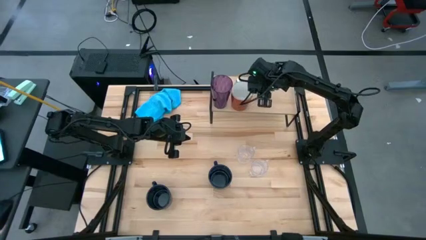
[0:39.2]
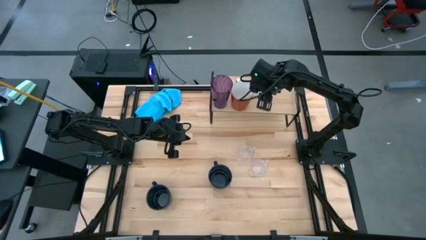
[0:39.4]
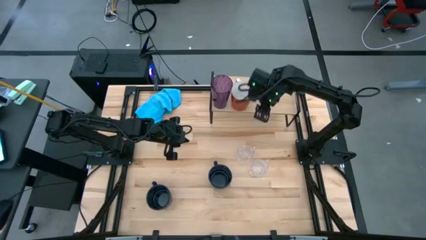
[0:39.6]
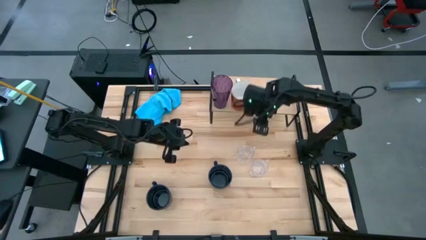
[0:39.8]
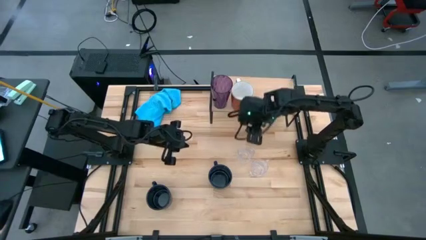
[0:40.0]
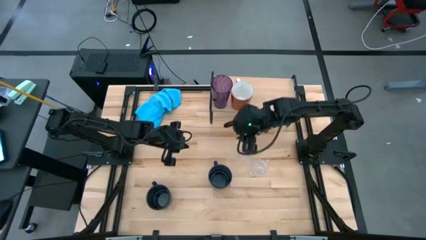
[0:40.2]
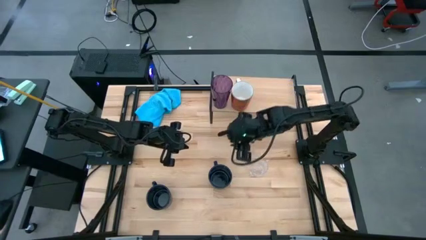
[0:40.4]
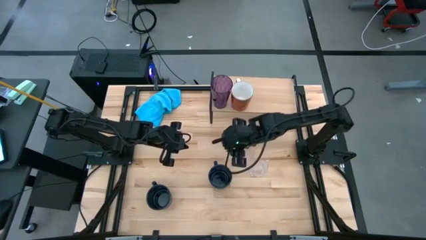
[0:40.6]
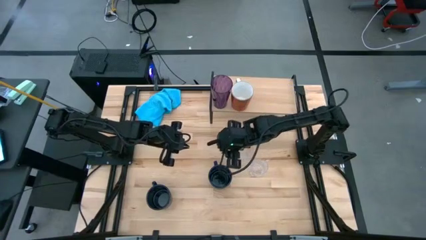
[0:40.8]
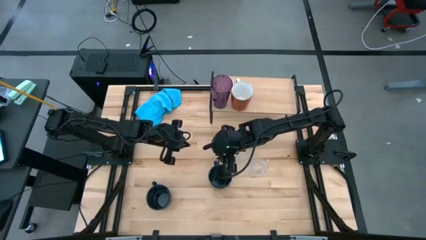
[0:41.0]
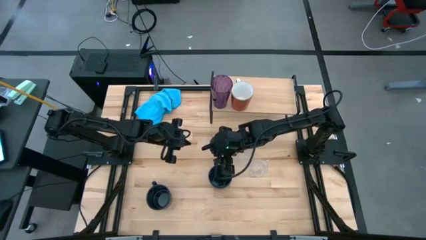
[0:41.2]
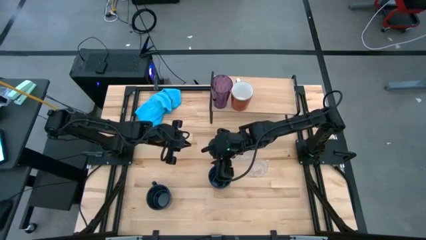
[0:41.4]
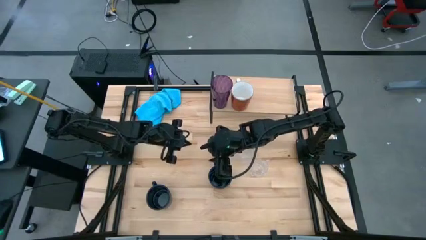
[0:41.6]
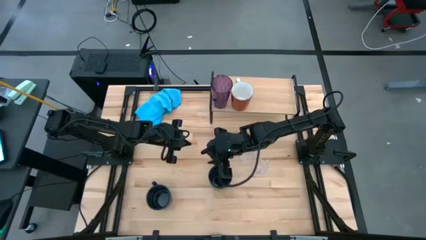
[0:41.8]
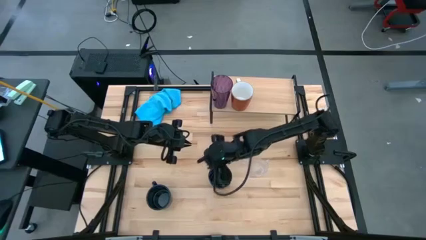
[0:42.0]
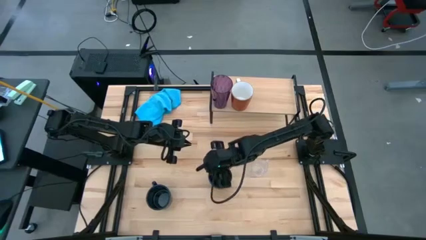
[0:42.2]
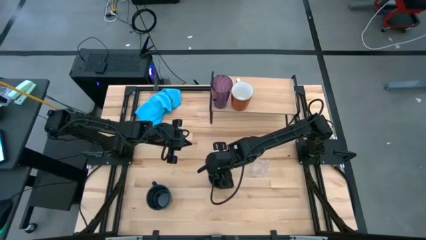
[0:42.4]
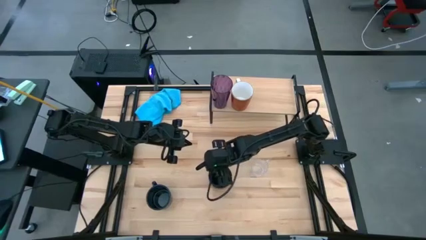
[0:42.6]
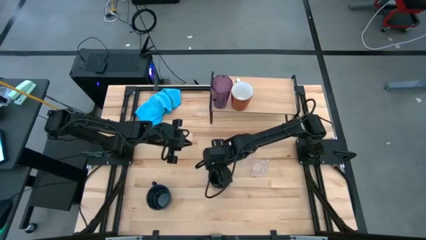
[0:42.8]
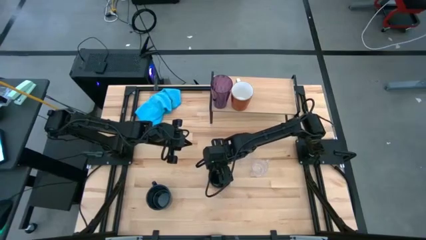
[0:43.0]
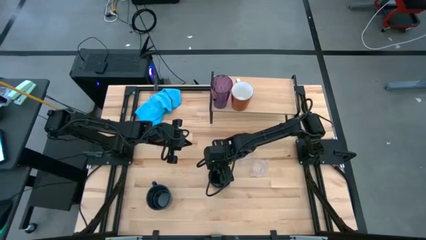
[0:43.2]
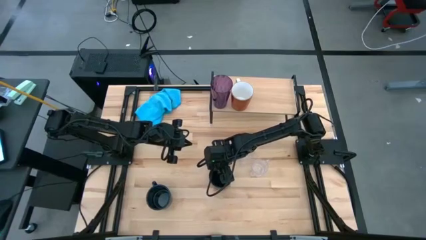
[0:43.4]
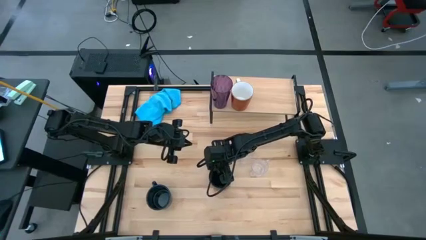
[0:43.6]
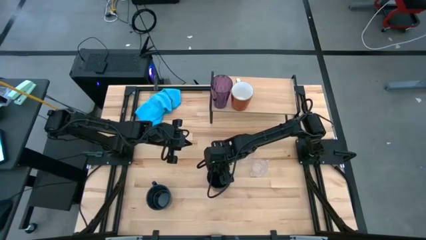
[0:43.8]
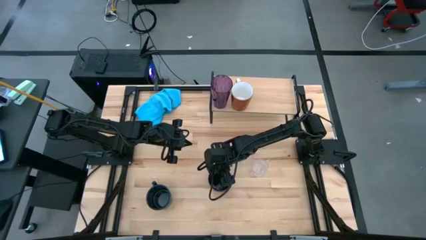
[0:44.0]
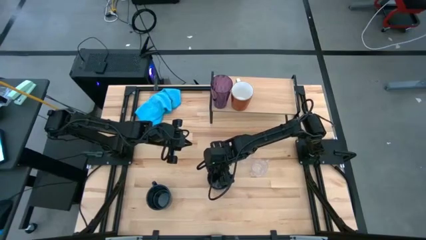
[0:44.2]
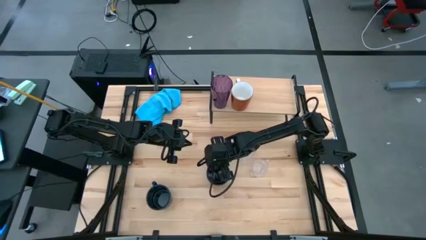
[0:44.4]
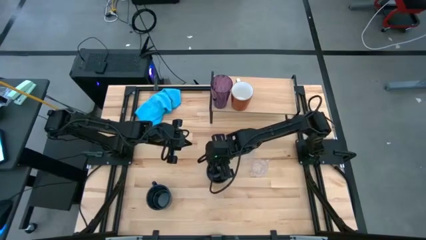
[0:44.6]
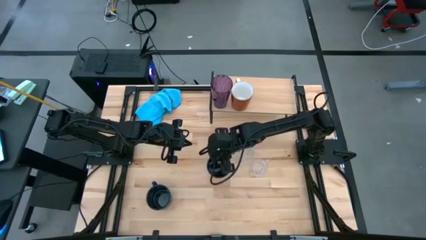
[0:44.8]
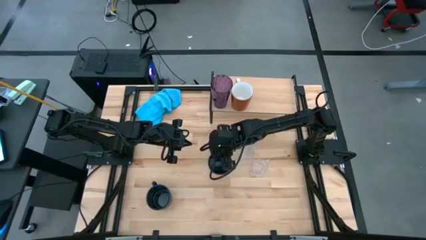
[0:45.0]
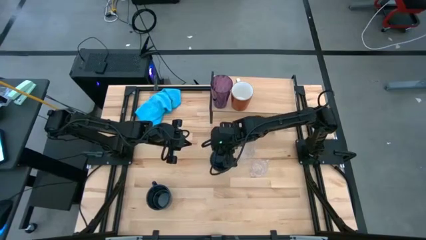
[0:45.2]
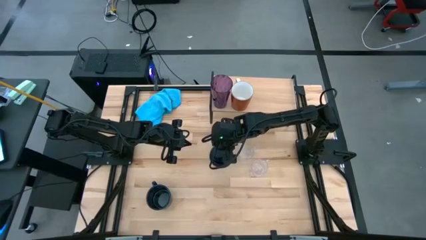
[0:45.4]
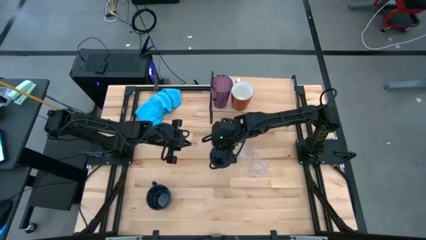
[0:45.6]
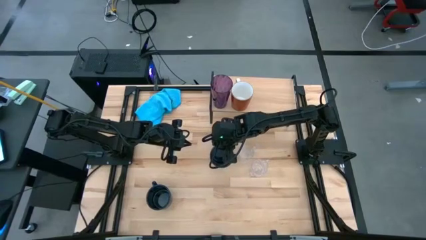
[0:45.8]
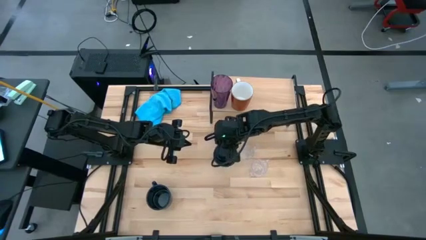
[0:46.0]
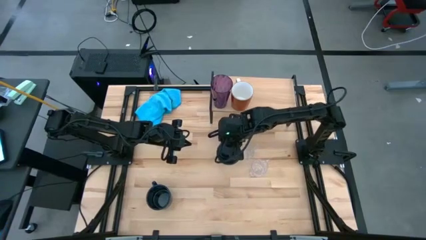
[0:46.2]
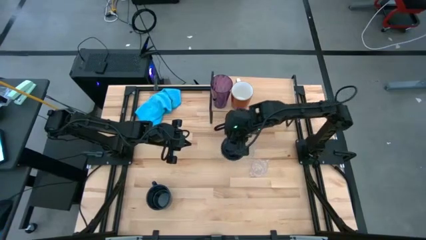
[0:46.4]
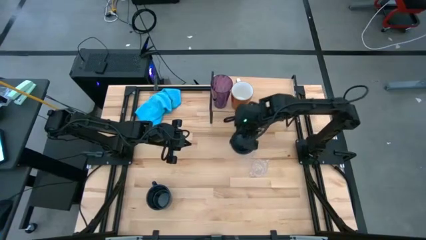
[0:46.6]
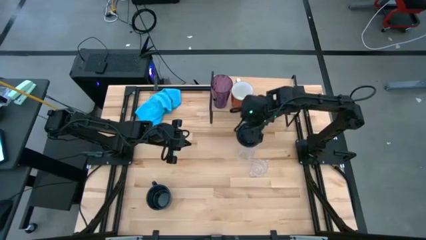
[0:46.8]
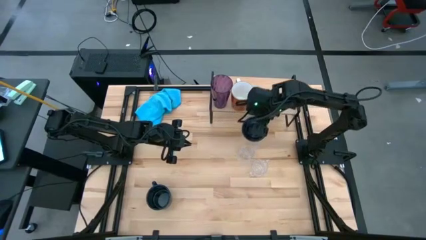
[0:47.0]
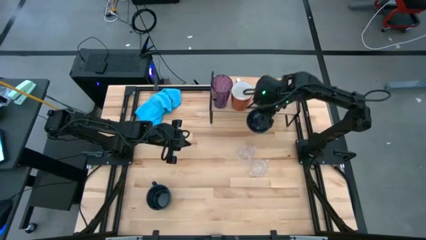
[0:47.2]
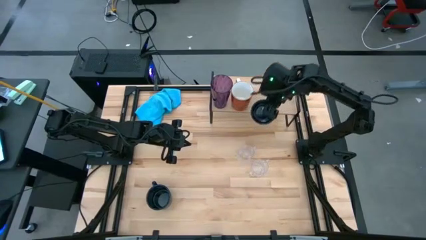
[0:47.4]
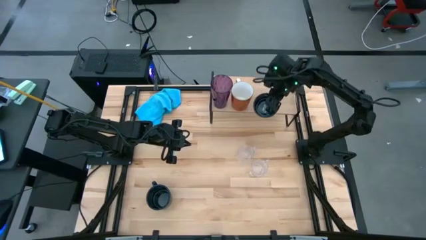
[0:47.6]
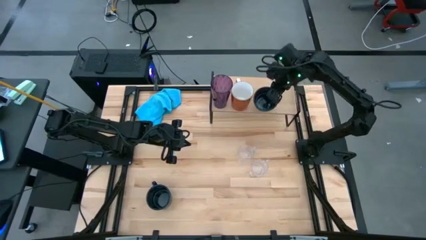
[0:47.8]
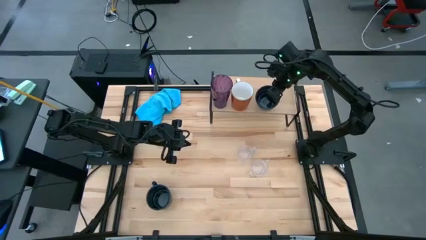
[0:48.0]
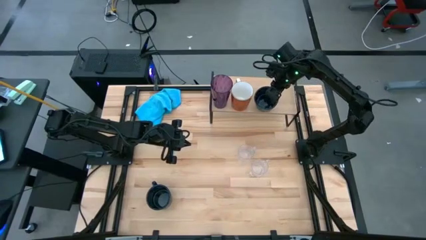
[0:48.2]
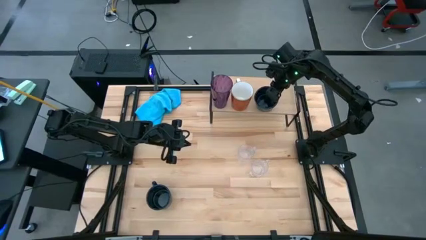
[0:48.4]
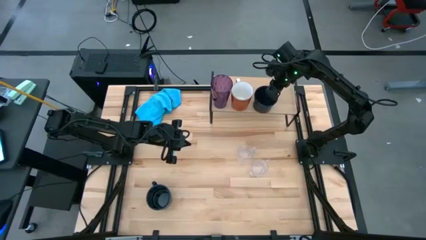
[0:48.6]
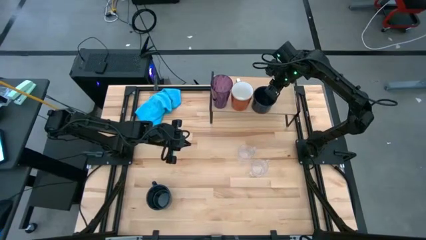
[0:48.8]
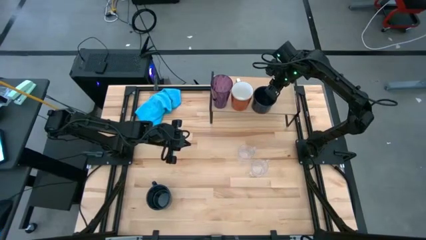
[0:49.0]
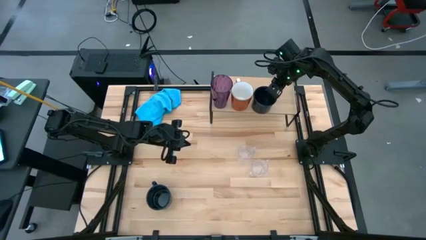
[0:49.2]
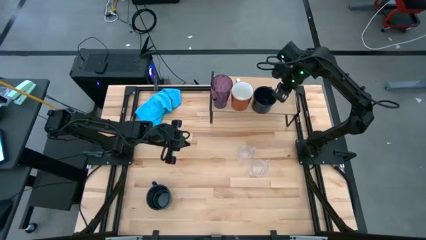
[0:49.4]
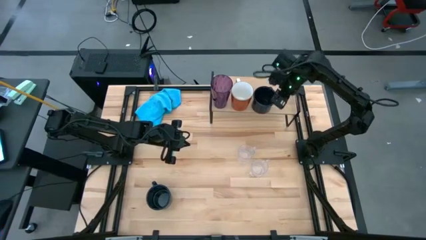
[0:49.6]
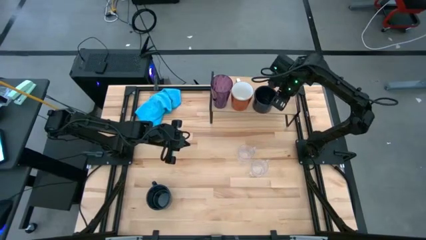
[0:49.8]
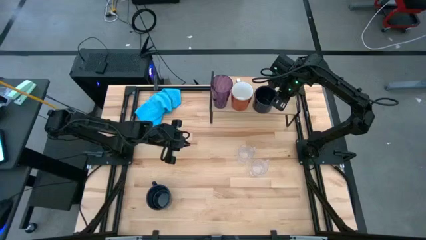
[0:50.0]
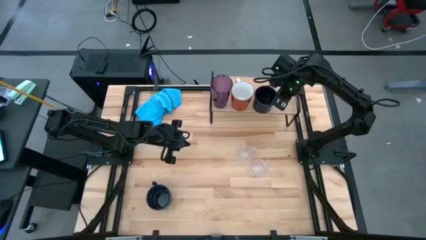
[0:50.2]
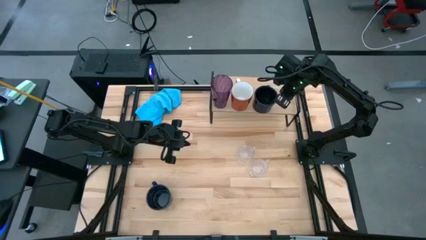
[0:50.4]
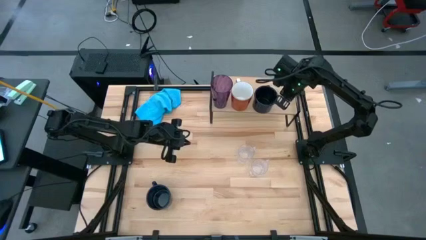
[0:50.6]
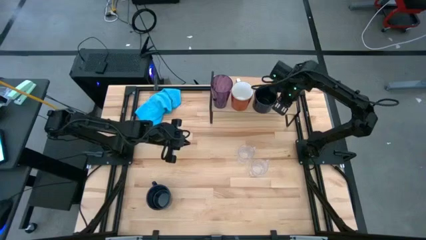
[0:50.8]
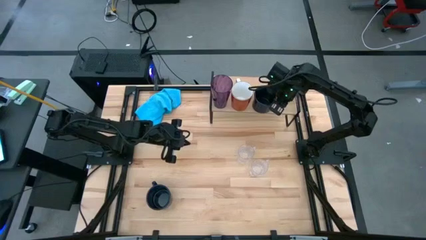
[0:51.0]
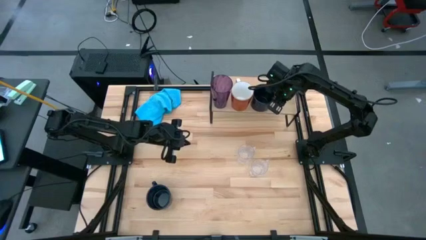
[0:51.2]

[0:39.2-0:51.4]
Task: Stack small to large cups/mugs on shelf
Put the dark blue mug on the shelf
